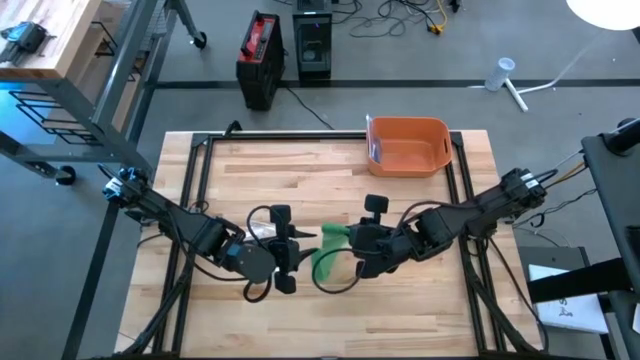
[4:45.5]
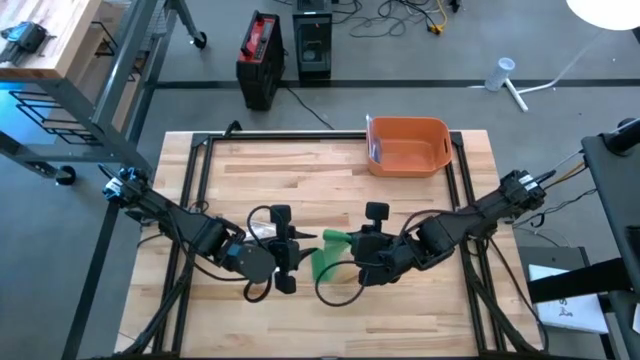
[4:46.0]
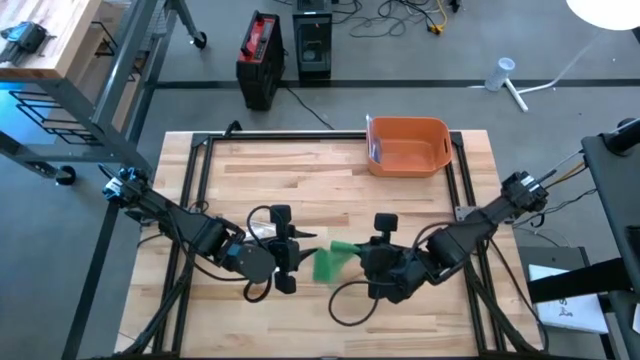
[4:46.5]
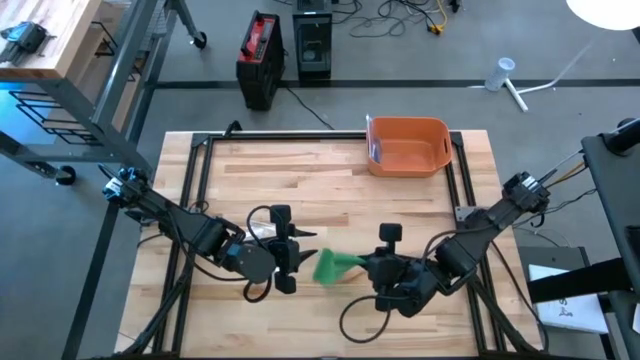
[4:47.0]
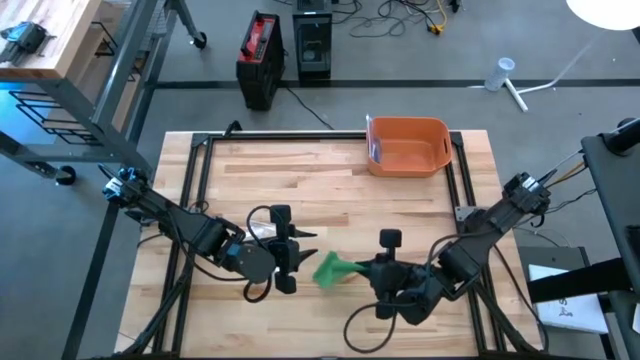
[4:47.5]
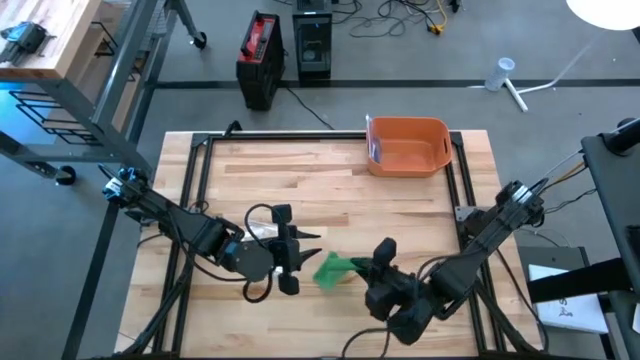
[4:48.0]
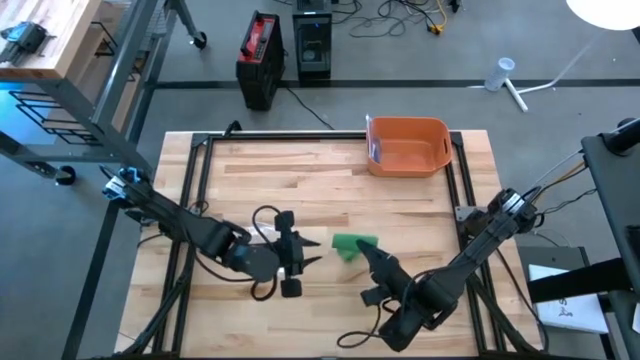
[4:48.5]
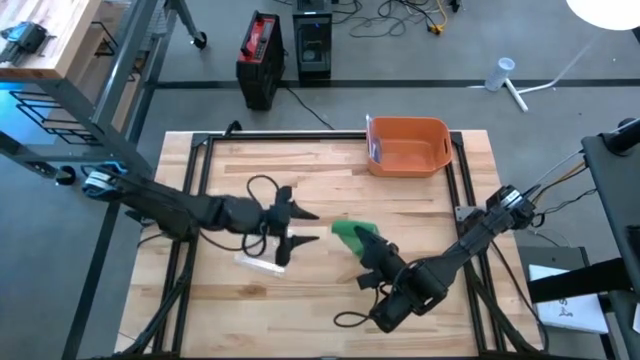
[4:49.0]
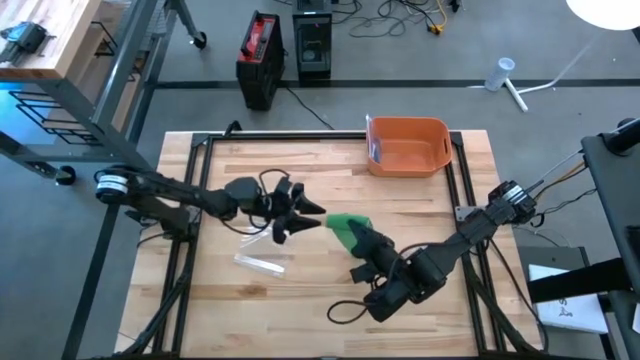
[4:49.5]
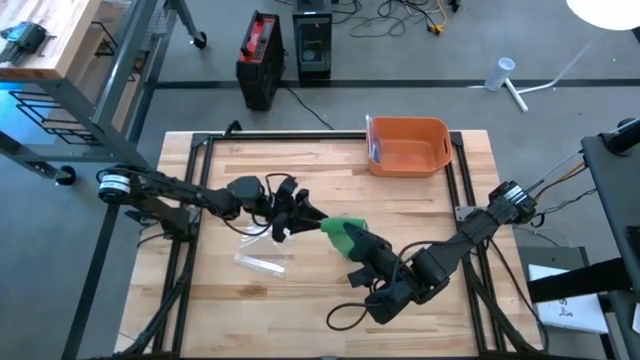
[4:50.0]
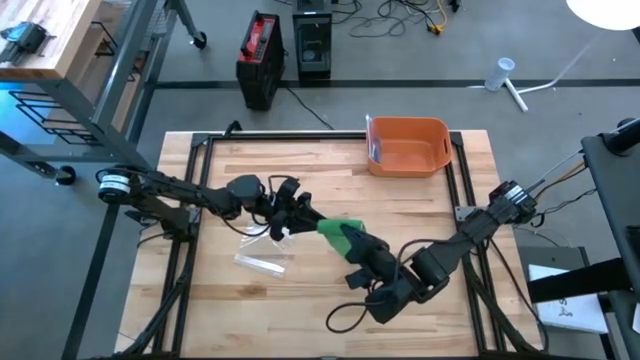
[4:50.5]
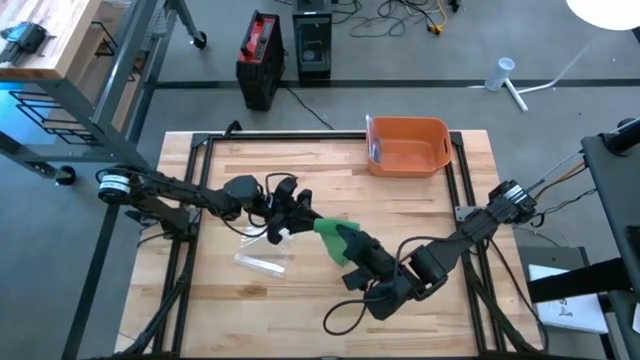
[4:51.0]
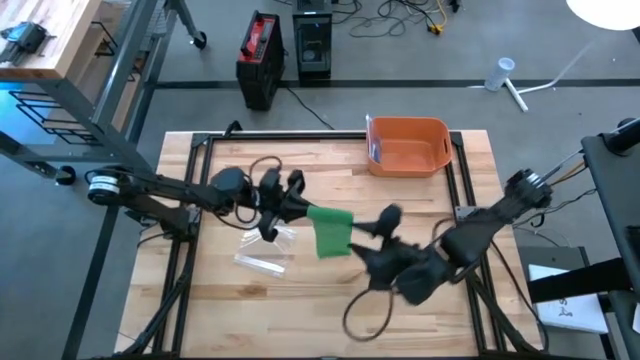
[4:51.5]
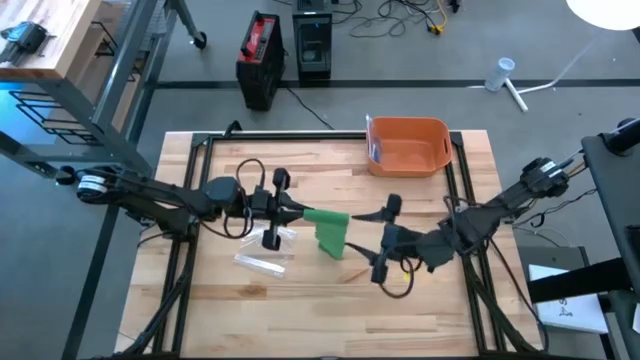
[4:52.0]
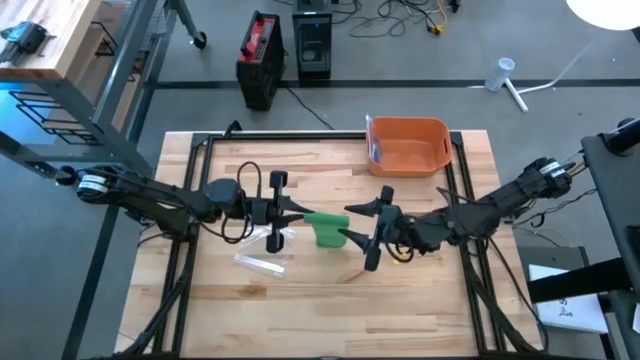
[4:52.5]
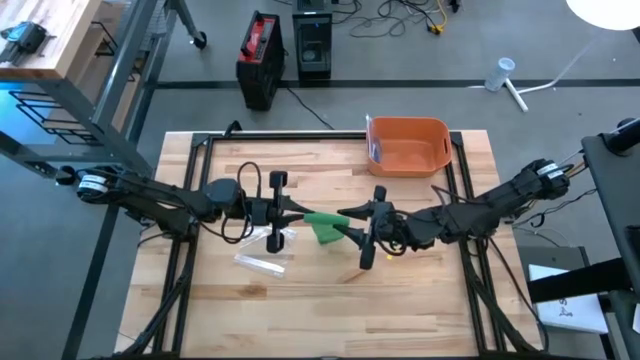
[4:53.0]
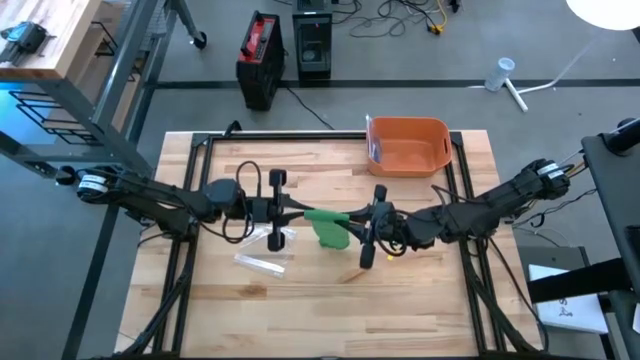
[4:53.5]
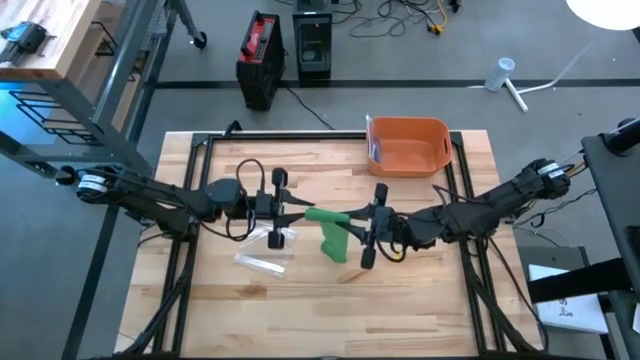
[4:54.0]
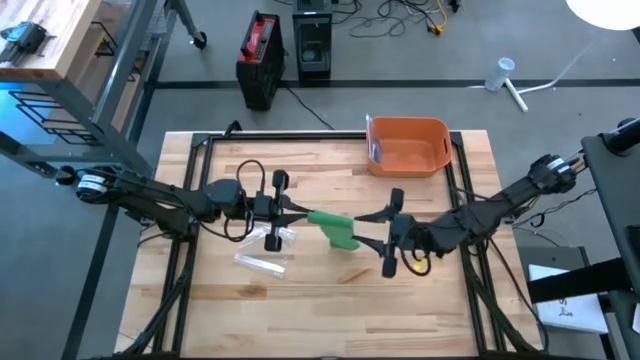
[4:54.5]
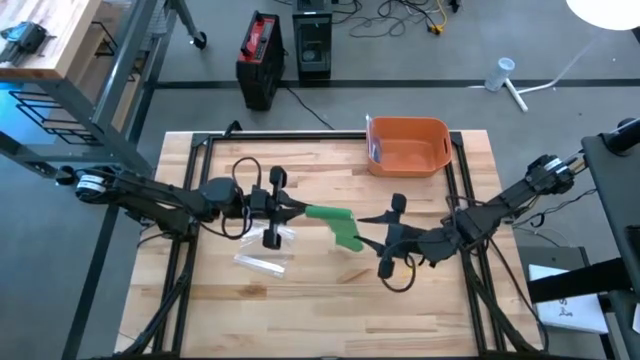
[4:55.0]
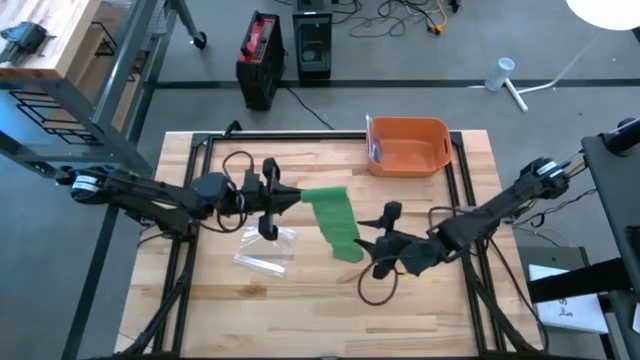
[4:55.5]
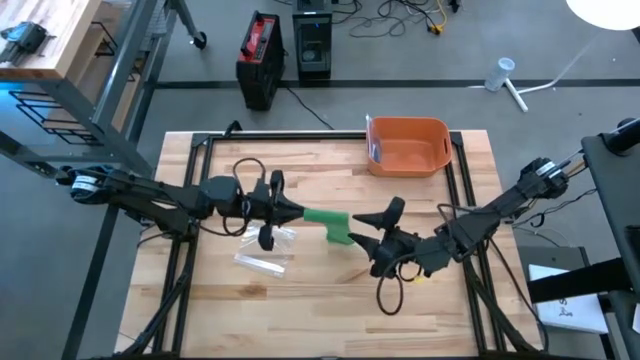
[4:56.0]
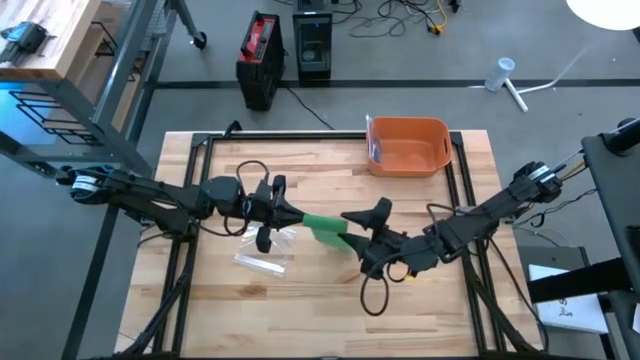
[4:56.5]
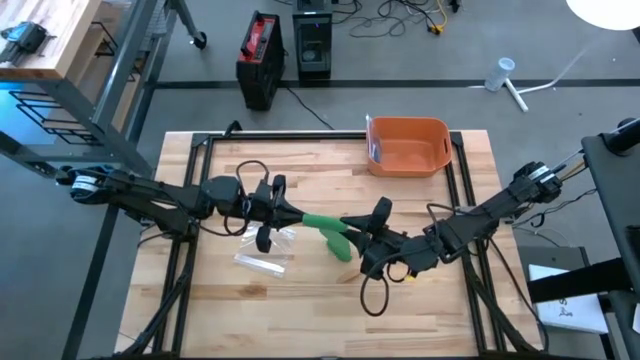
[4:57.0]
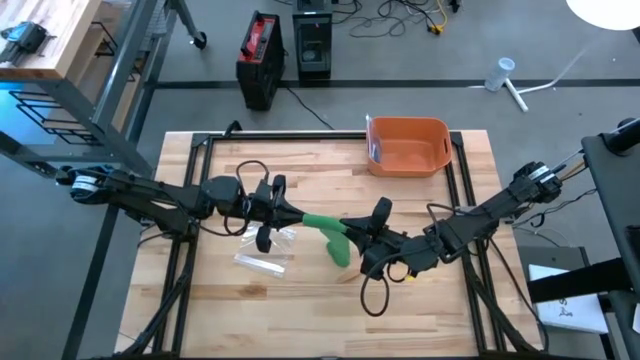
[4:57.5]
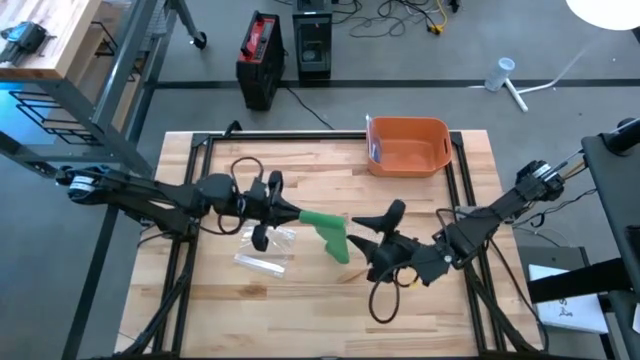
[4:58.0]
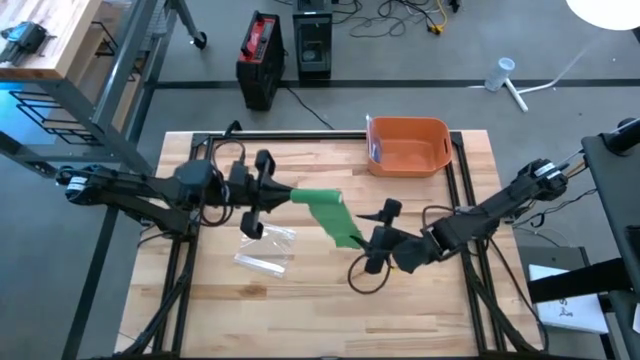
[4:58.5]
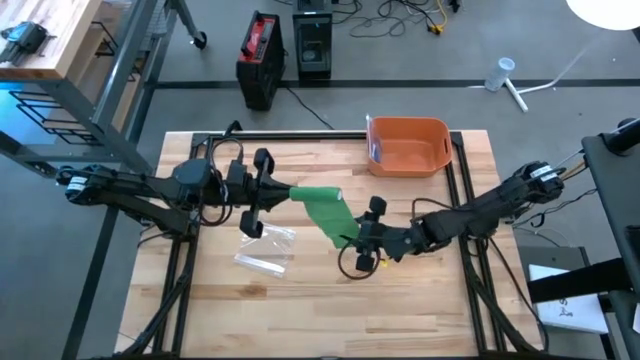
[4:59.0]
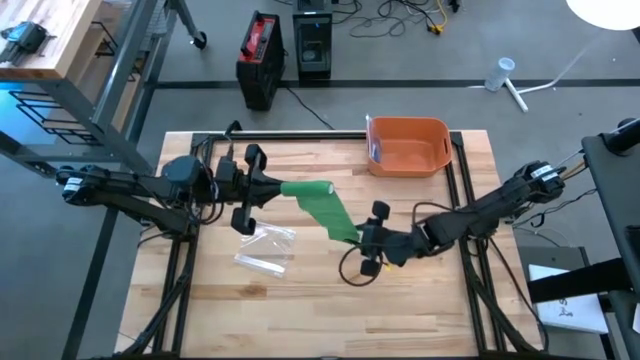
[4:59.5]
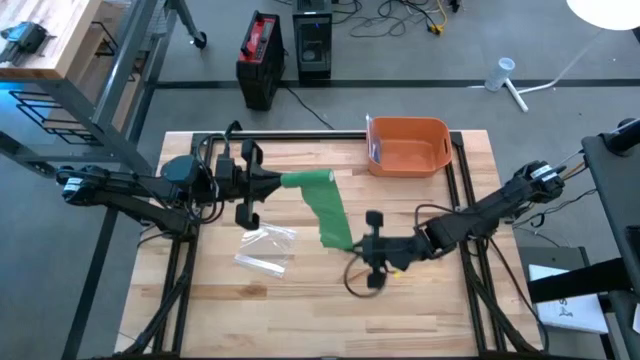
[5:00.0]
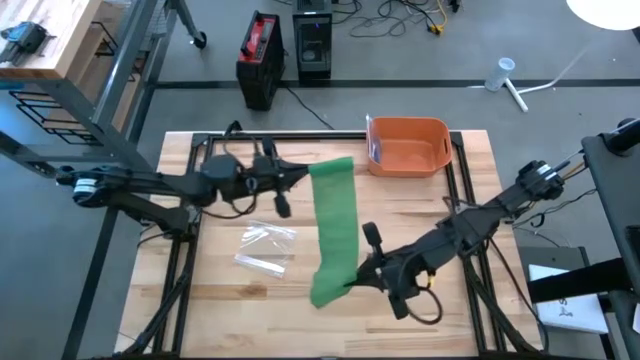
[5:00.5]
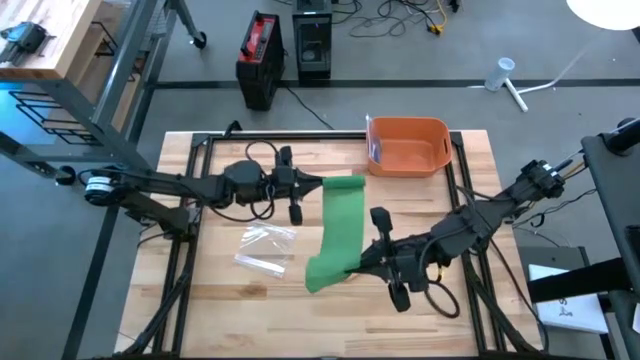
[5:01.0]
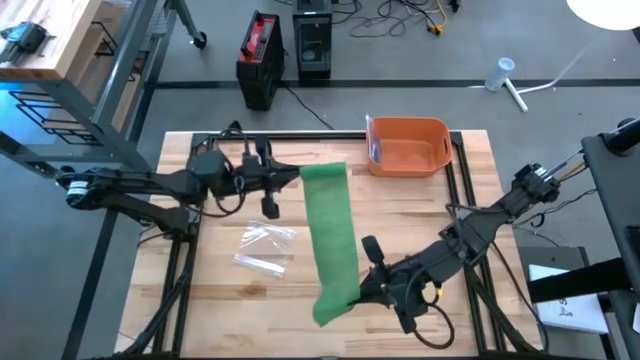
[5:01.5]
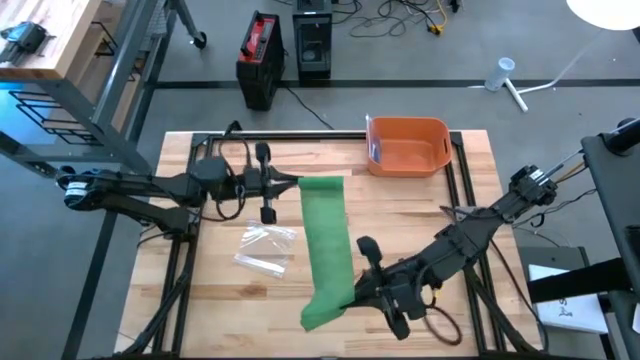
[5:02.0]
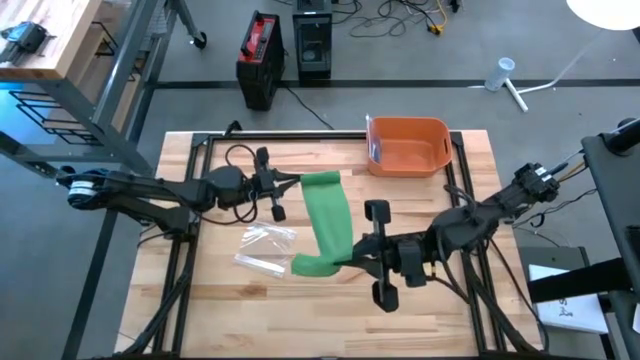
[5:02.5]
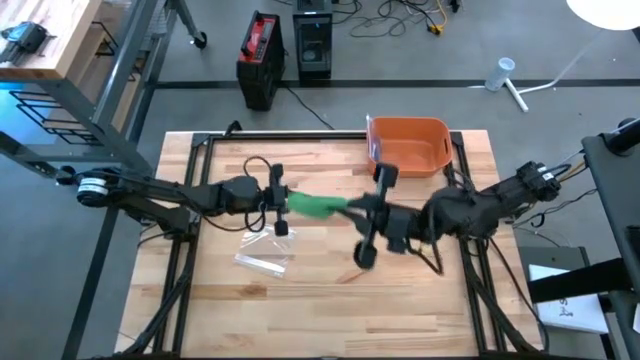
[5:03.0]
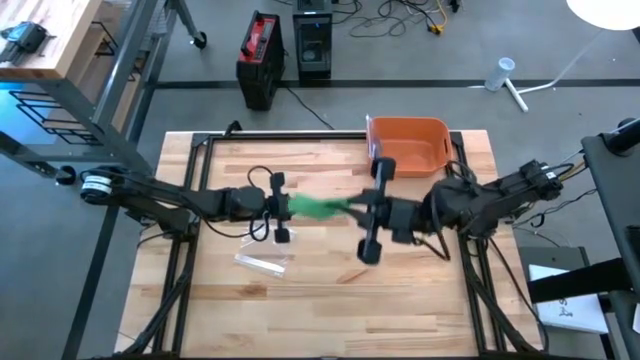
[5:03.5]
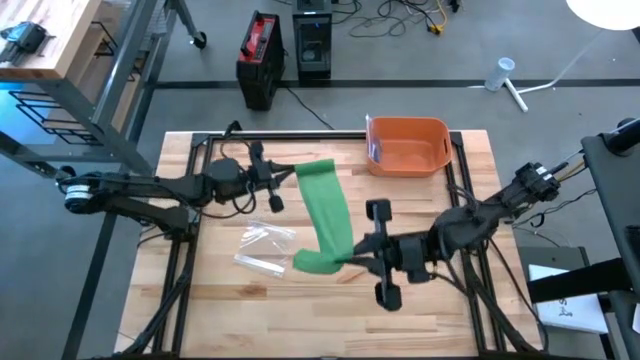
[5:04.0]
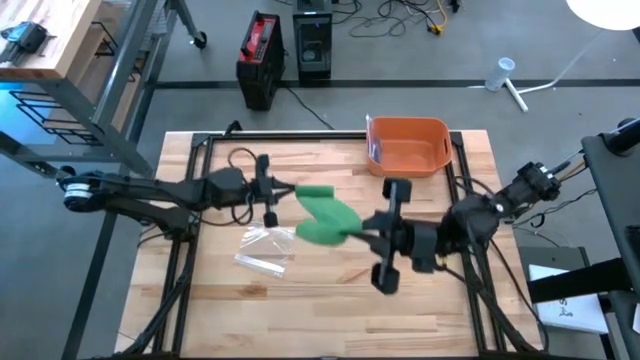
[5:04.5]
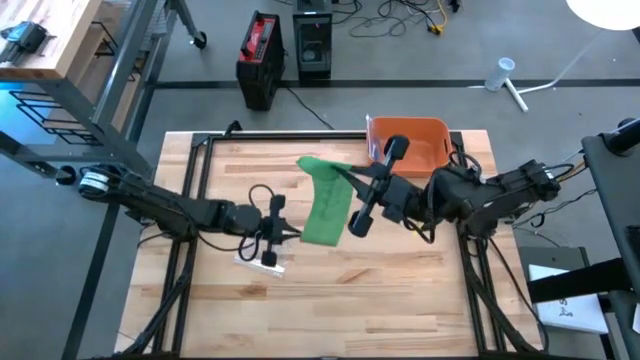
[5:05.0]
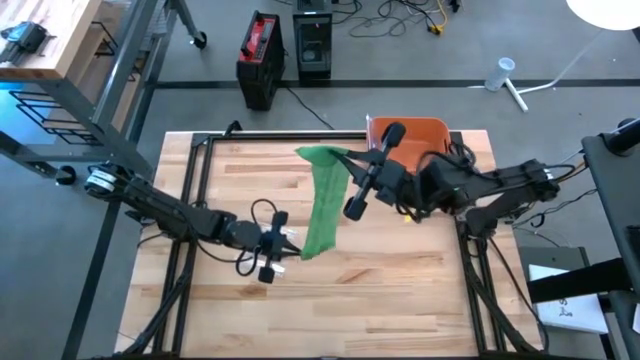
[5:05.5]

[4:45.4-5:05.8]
Task: Roll bandage
Roll the green bandage
